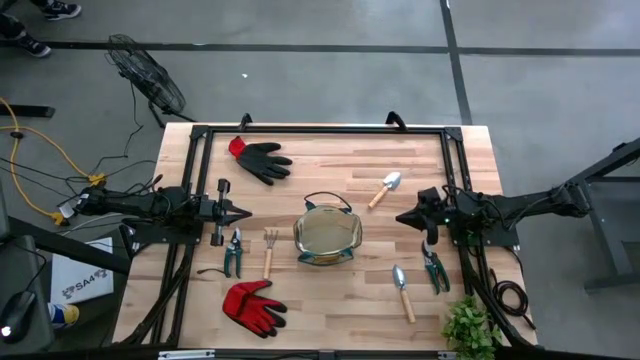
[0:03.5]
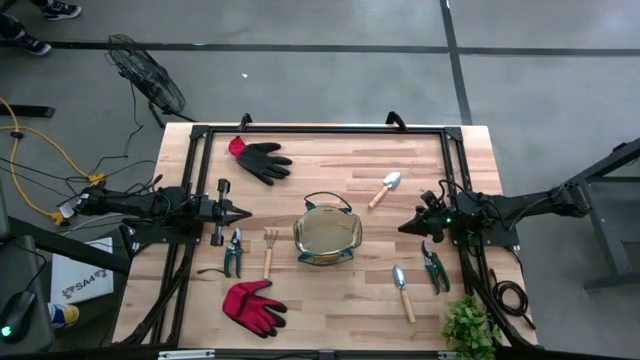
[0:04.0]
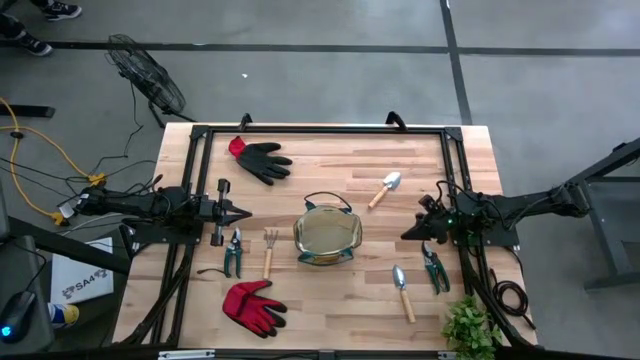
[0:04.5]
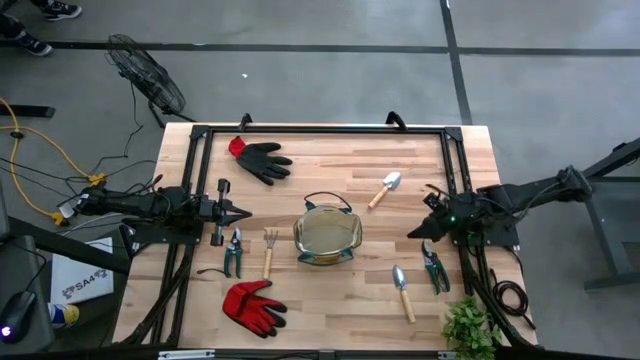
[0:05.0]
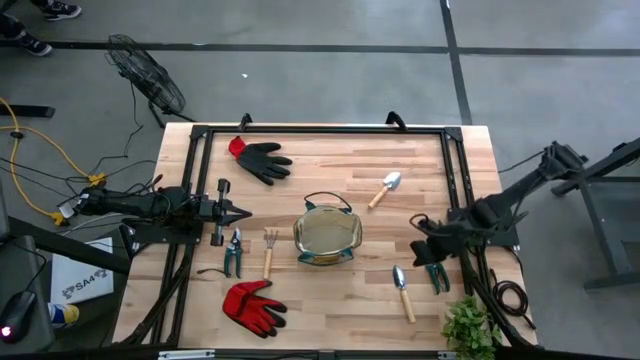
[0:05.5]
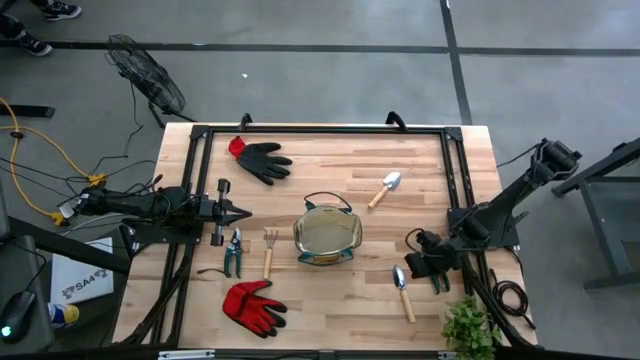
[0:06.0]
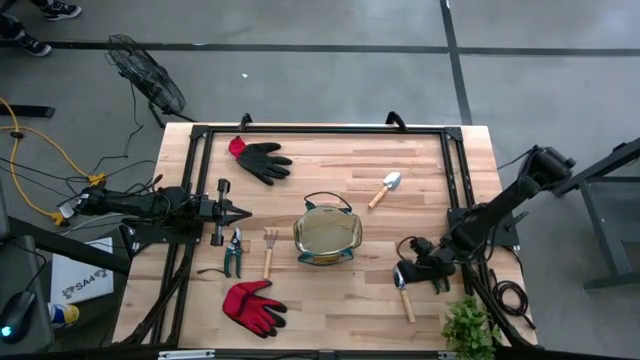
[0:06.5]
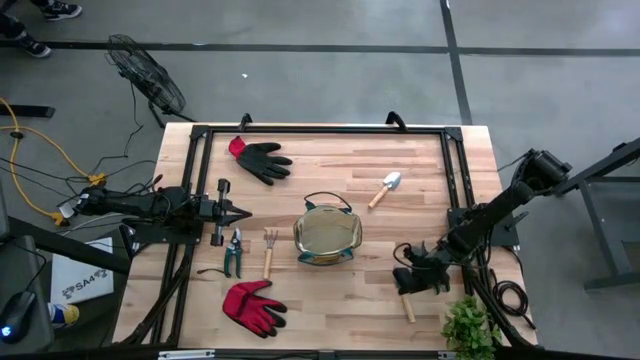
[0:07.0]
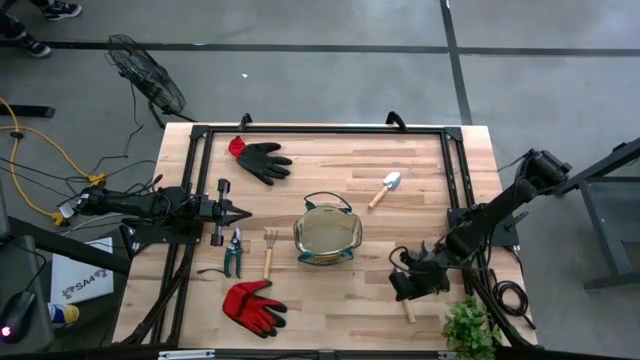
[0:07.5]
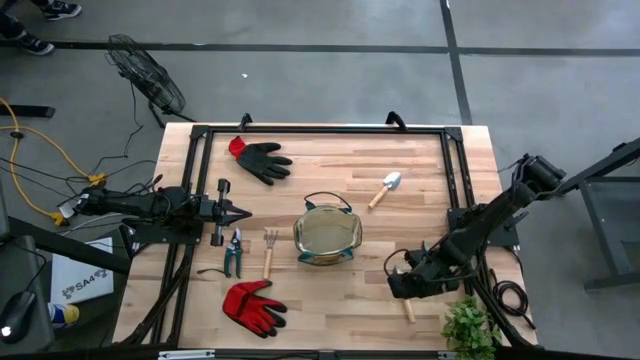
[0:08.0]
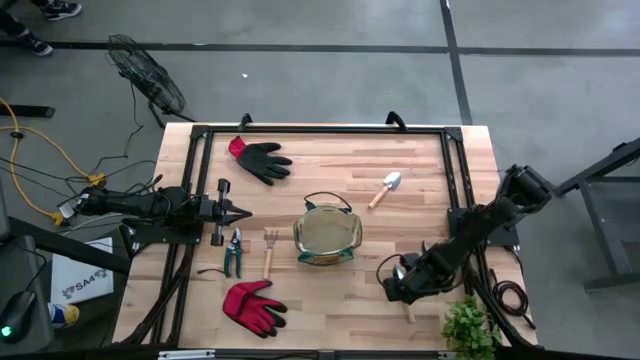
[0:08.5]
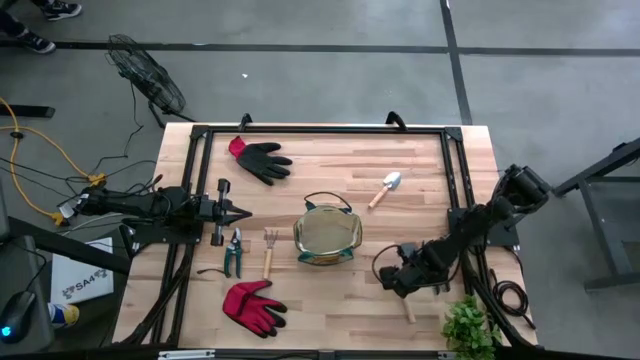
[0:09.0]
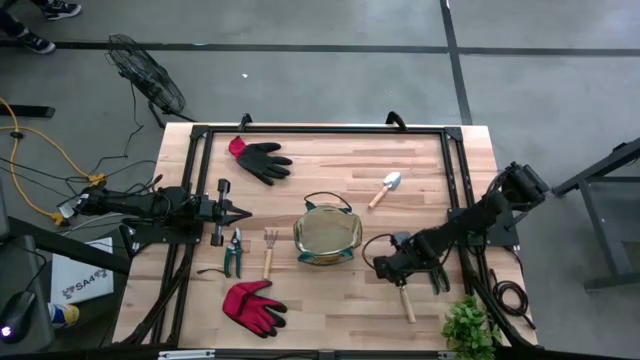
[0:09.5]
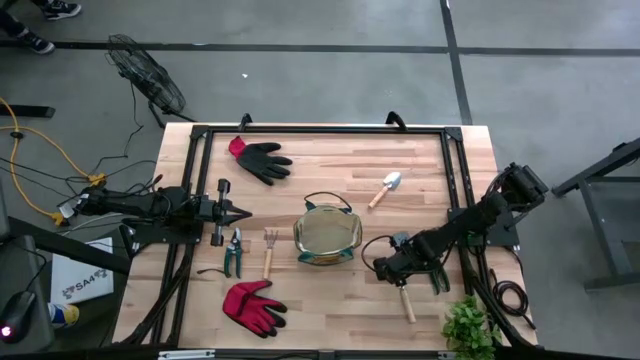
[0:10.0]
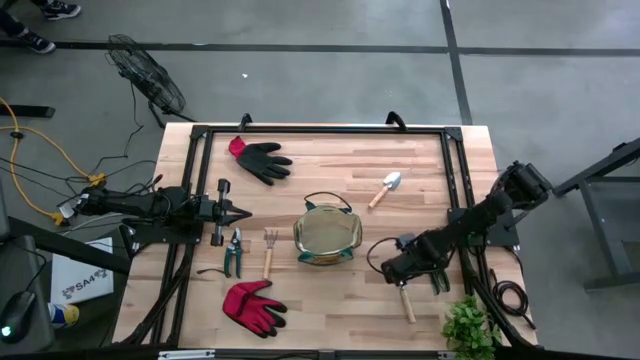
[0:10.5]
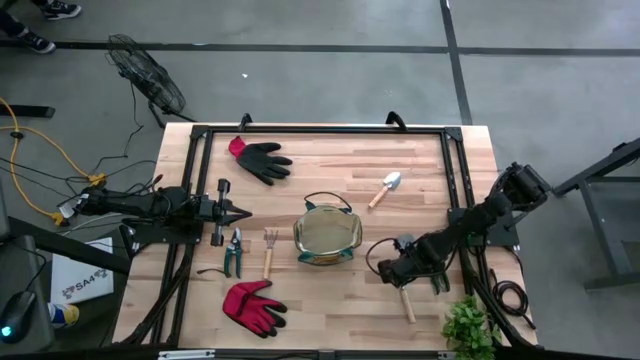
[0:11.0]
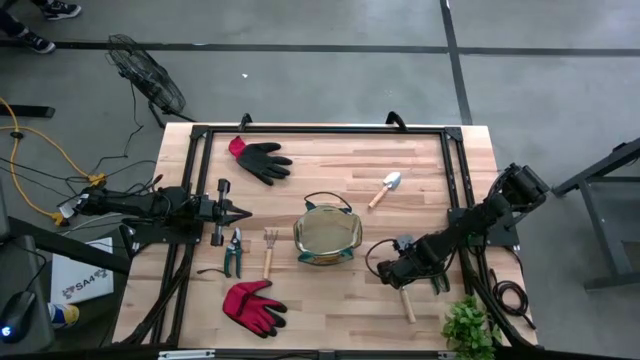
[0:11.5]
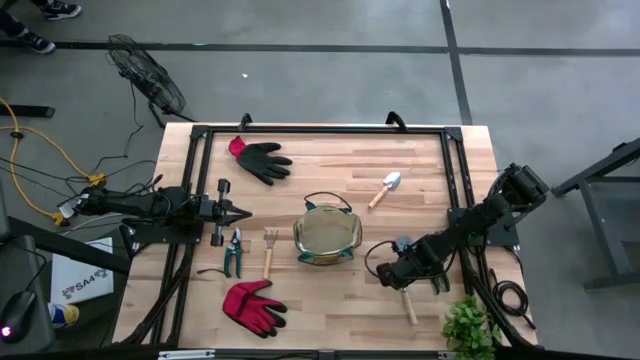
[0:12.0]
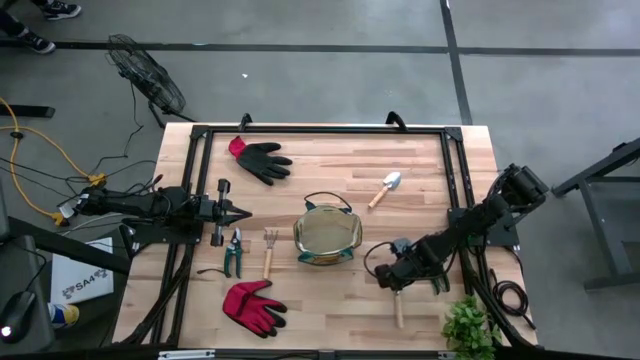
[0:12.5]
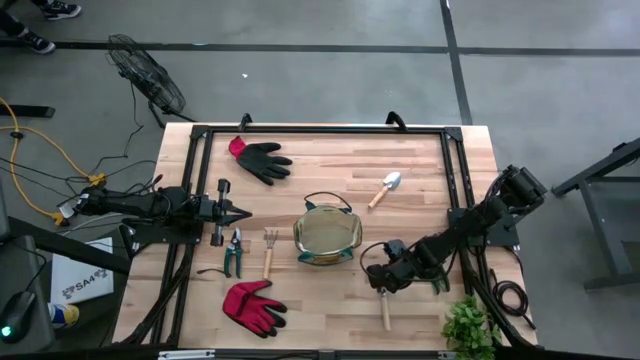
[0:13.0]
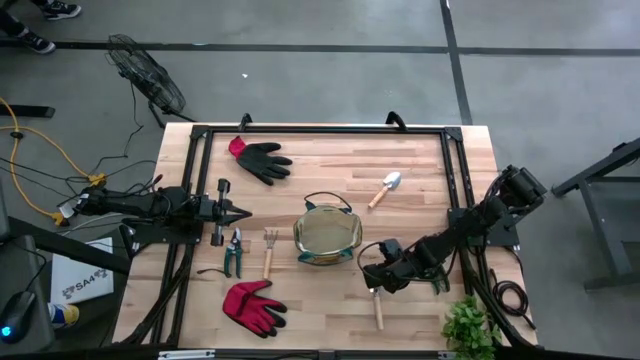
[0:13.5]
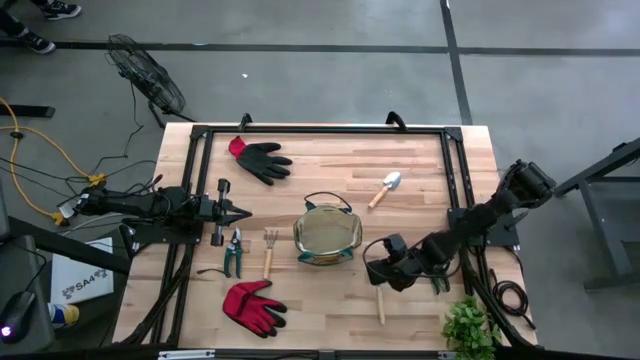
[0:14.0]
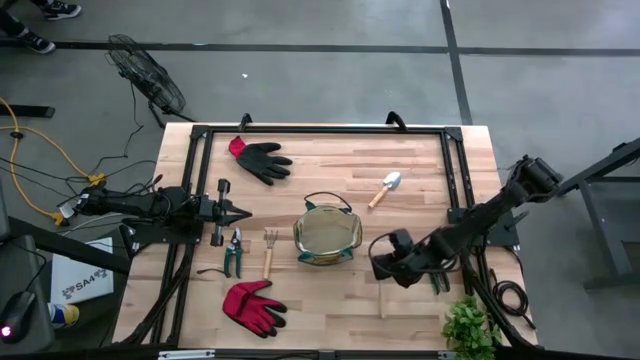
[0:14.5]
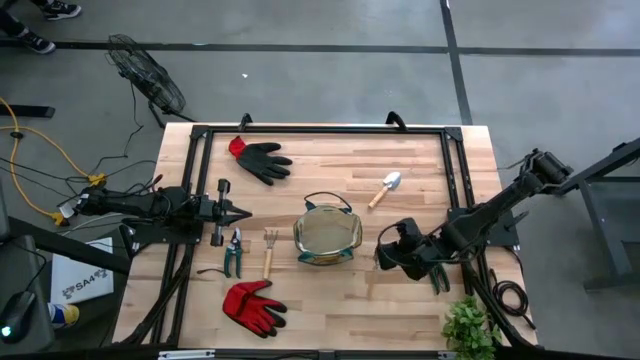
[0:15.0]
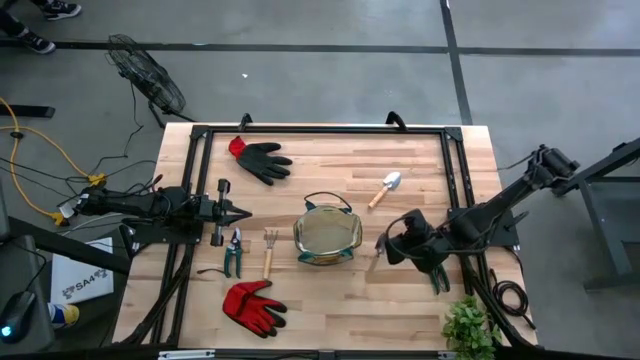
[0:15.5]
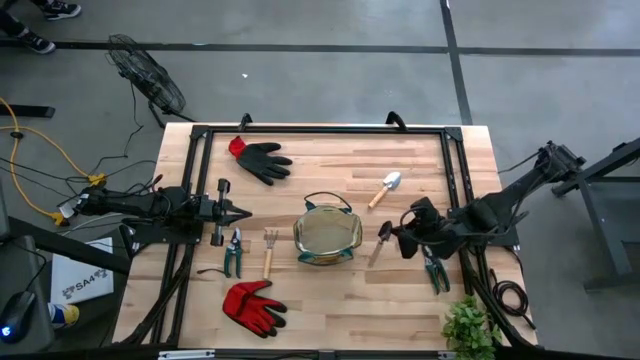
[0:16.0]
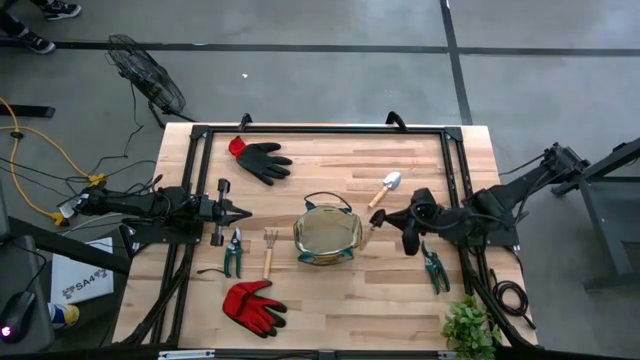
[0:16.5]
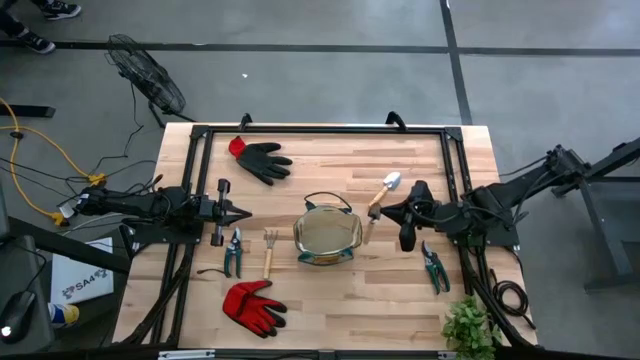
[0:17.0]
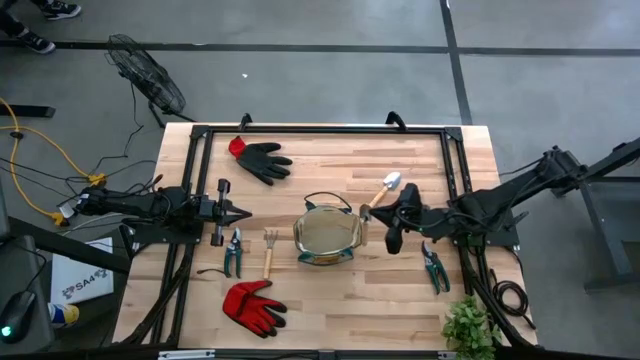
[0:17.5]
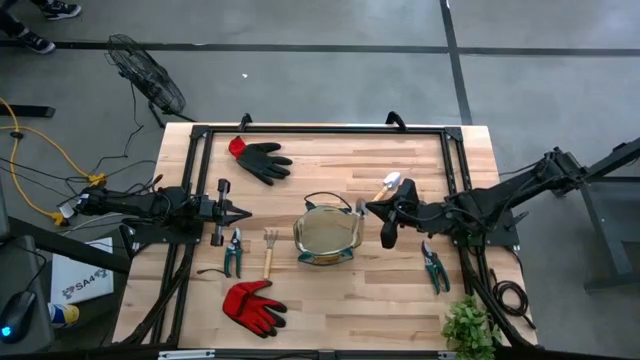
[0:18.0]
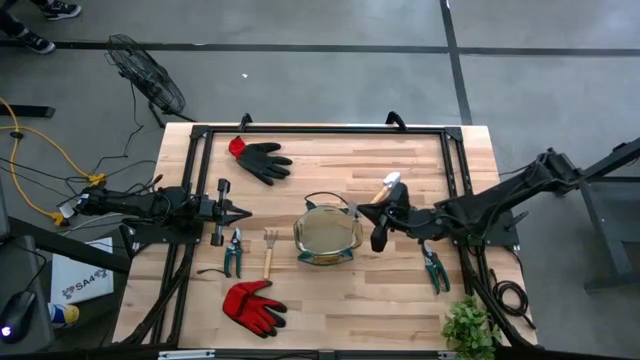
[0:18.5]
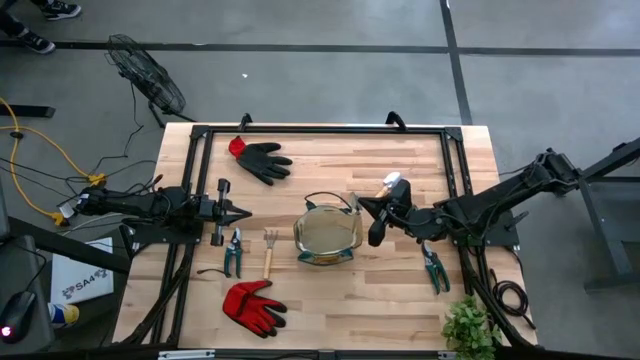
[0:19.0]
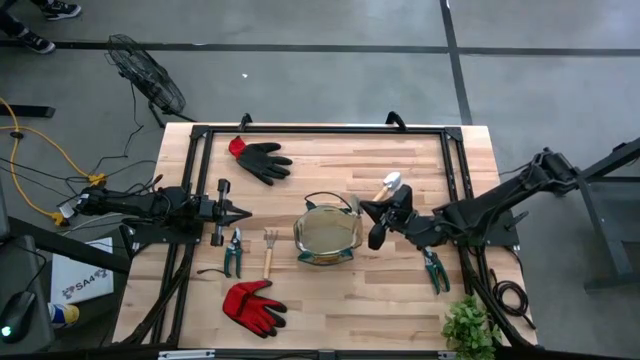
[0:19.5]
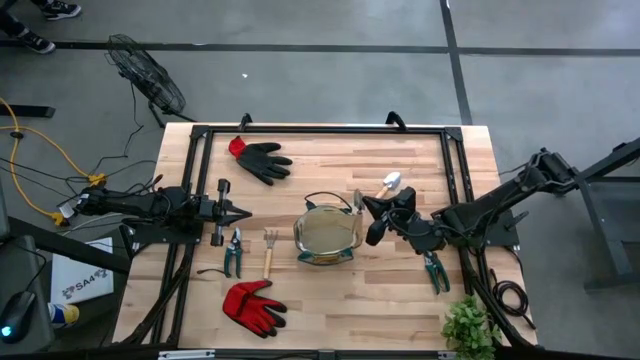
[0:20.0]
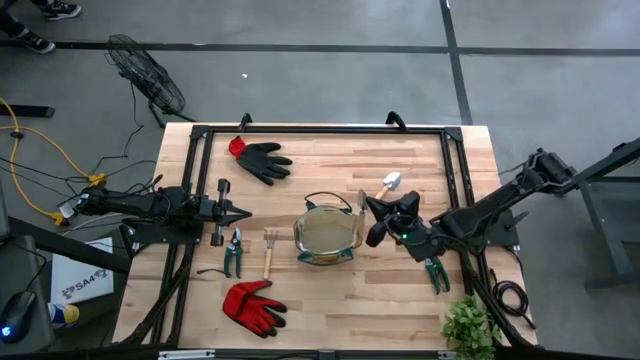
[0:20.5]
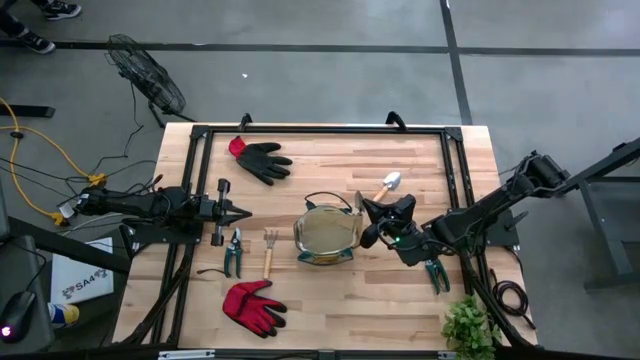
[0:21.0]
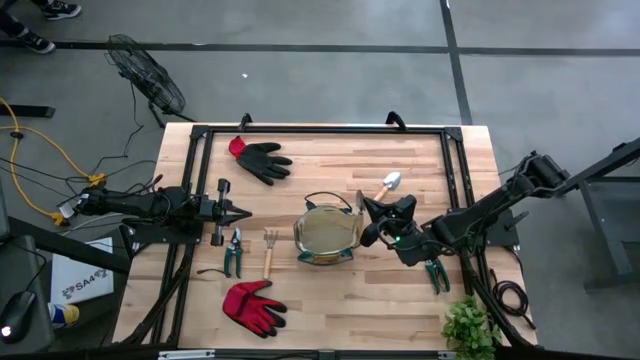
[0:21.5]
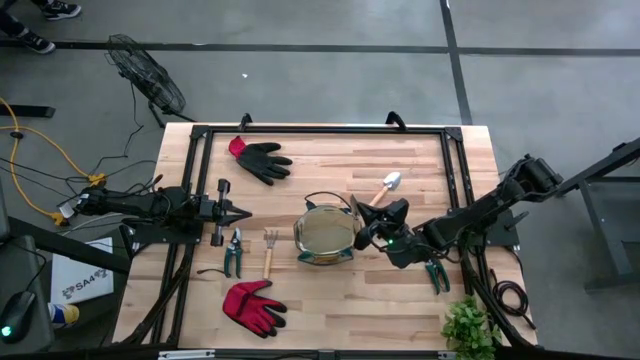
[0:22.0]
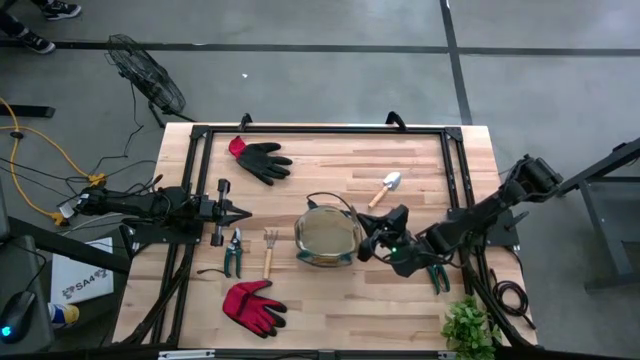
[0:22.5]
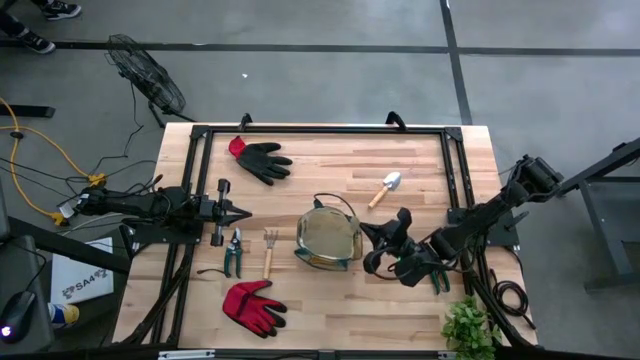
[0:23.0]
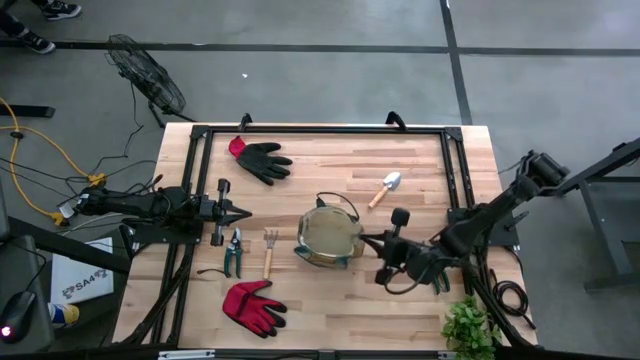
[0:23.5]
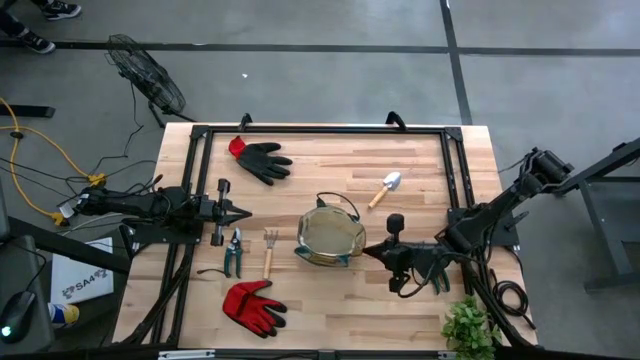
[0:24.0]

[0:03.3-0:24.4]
Task: Pick & Place Garden tools in Gardening bag
Put the brown trowel into the gardening bag
